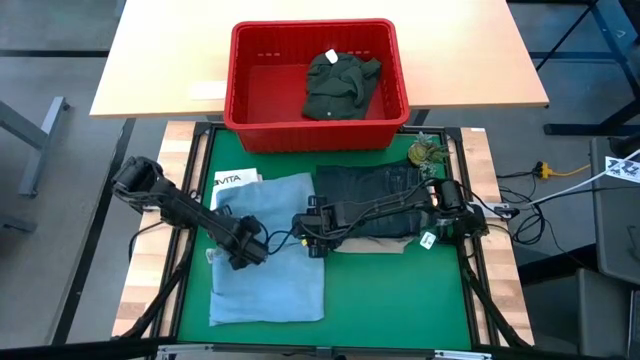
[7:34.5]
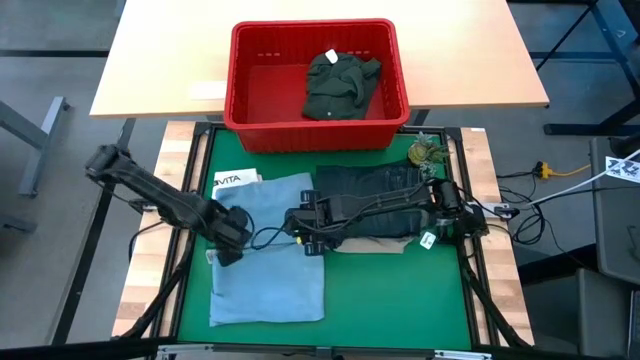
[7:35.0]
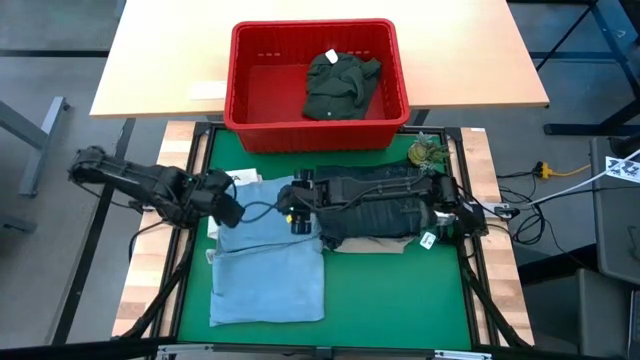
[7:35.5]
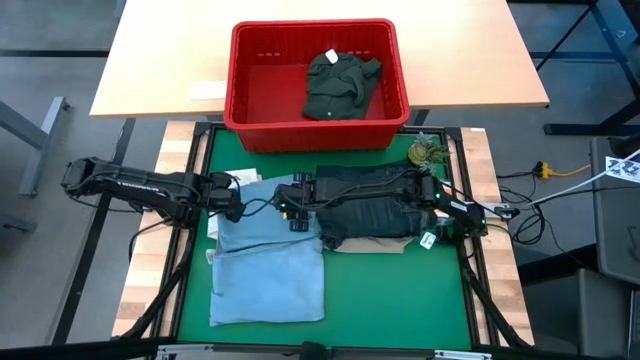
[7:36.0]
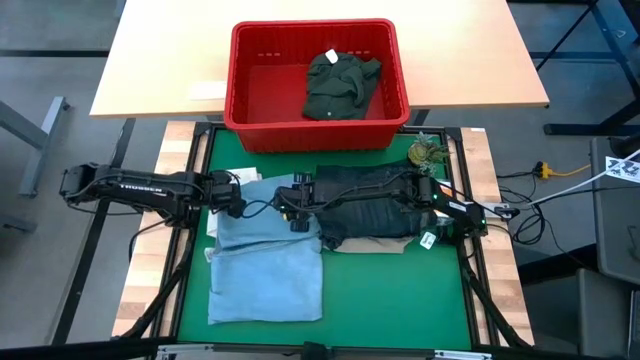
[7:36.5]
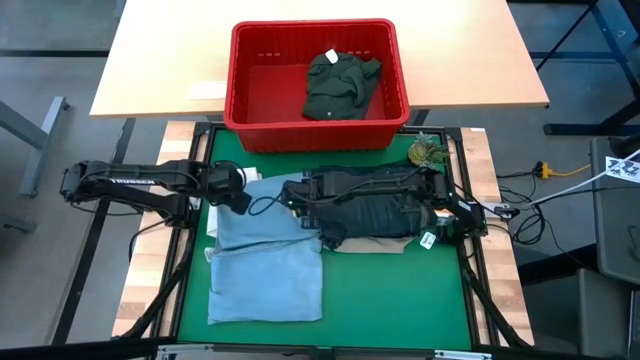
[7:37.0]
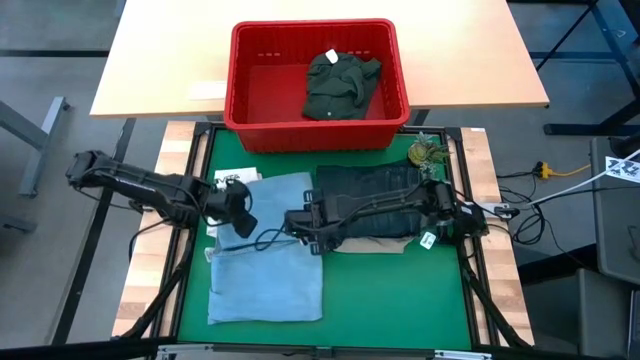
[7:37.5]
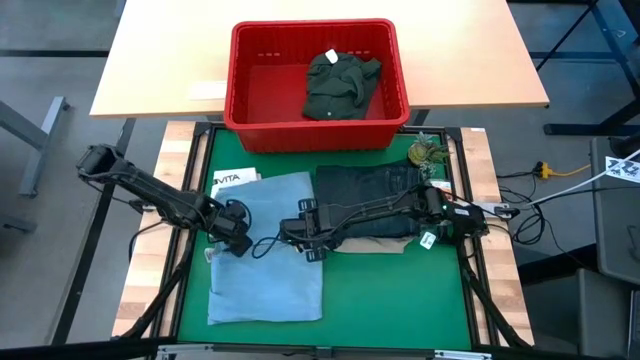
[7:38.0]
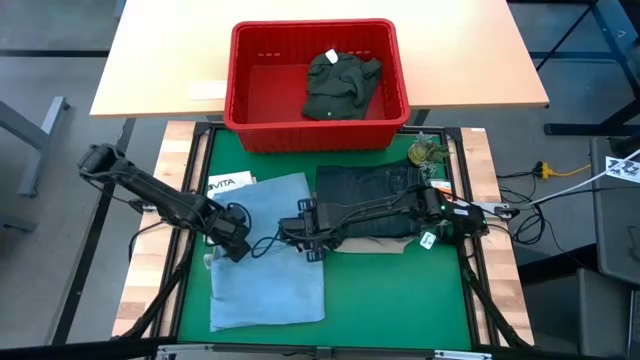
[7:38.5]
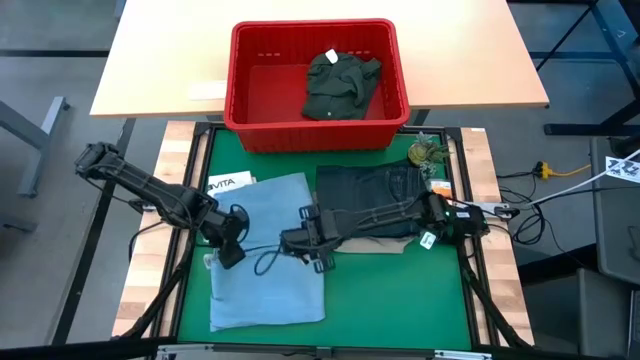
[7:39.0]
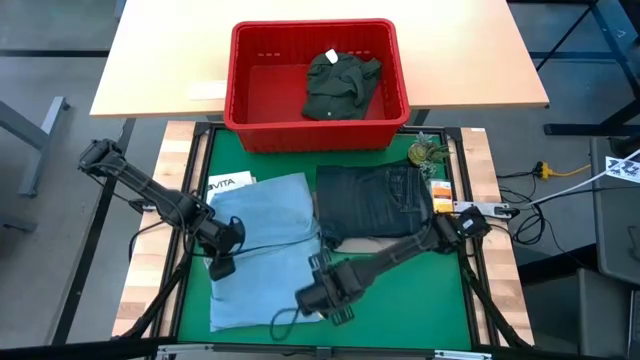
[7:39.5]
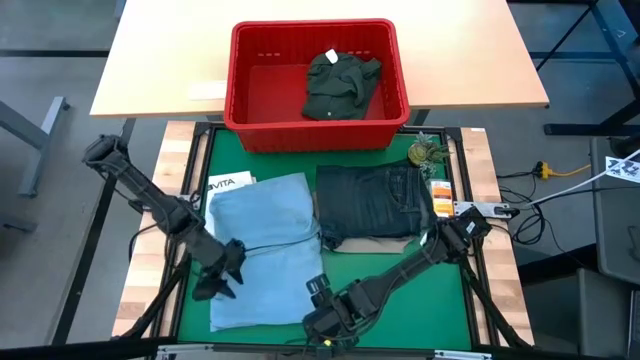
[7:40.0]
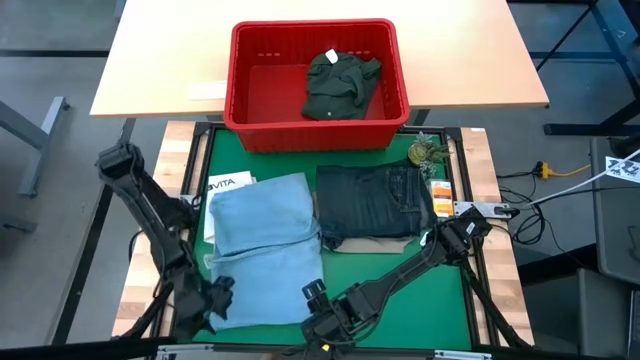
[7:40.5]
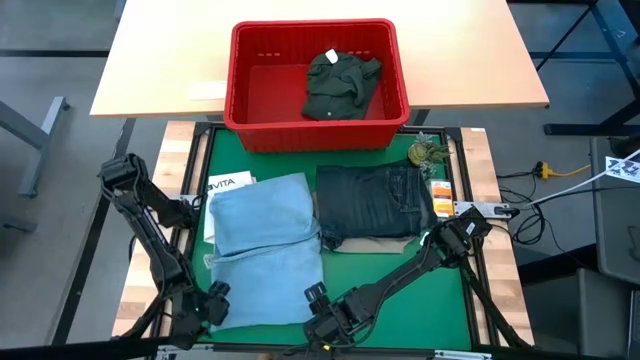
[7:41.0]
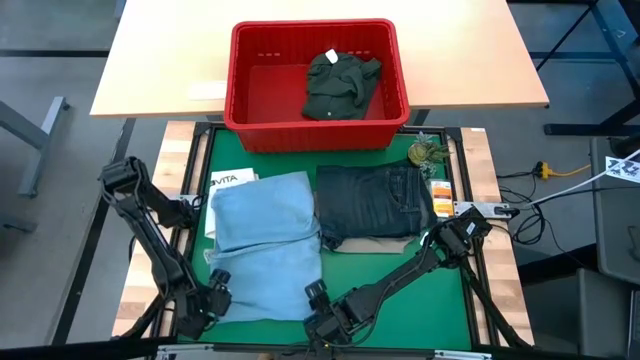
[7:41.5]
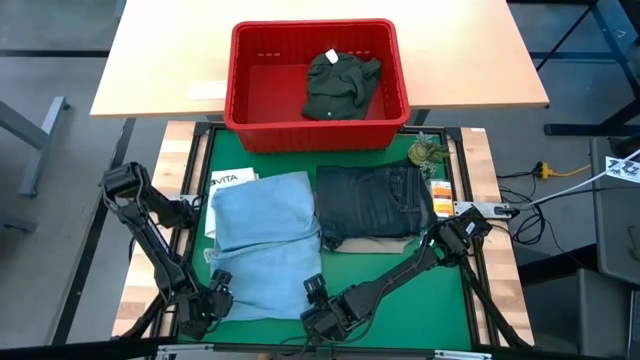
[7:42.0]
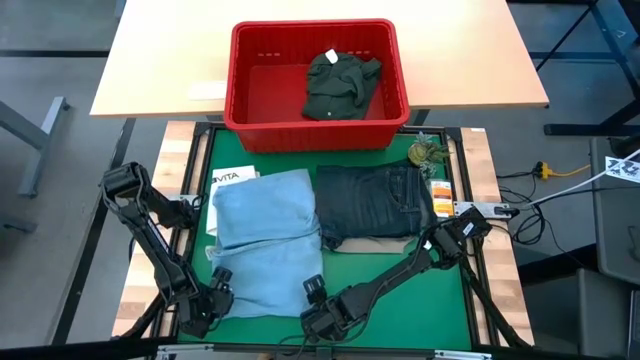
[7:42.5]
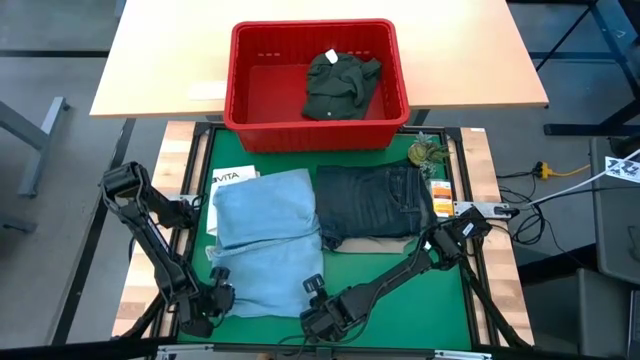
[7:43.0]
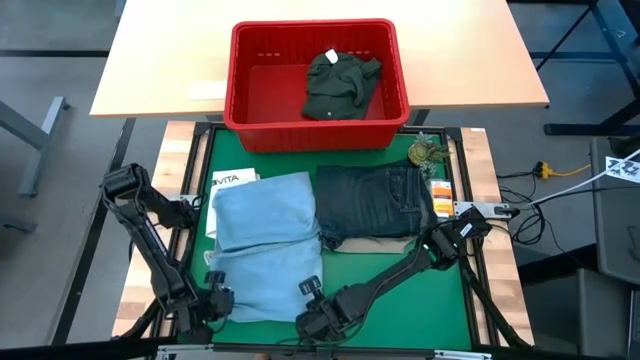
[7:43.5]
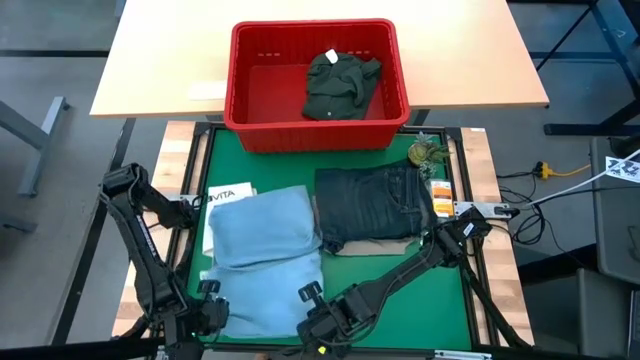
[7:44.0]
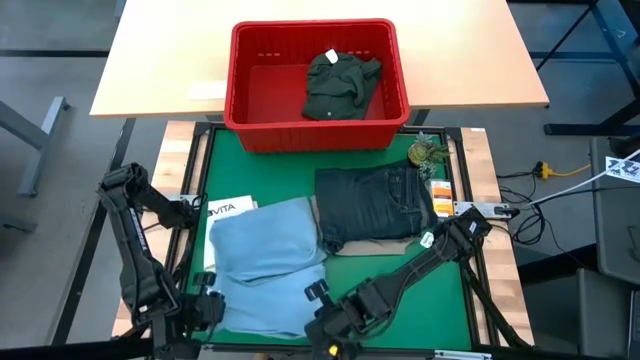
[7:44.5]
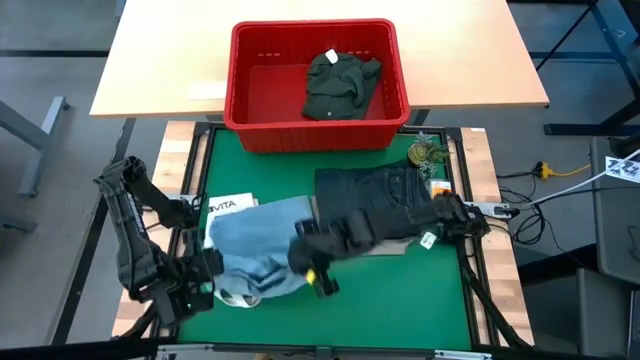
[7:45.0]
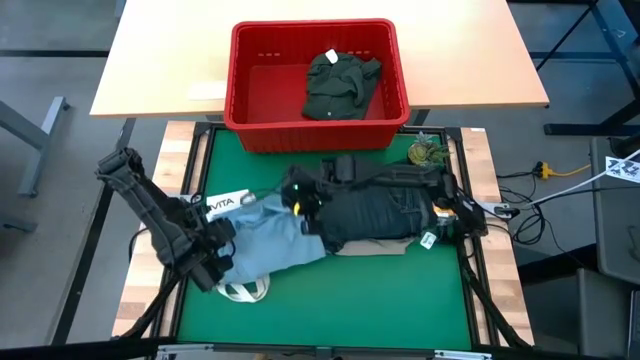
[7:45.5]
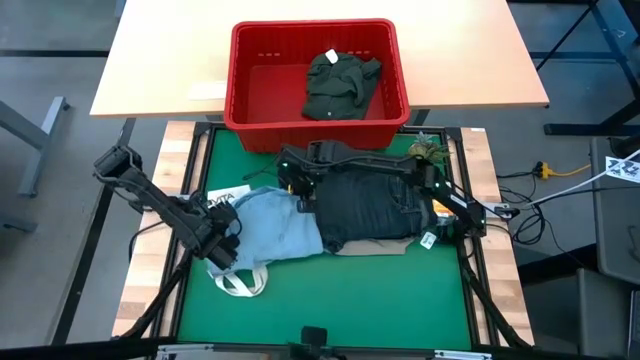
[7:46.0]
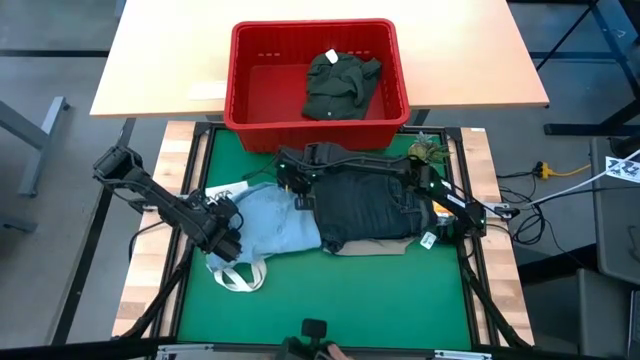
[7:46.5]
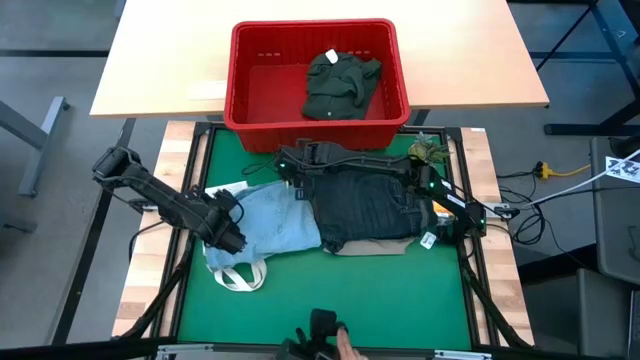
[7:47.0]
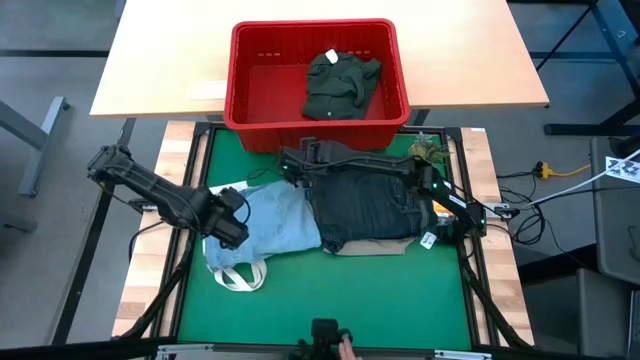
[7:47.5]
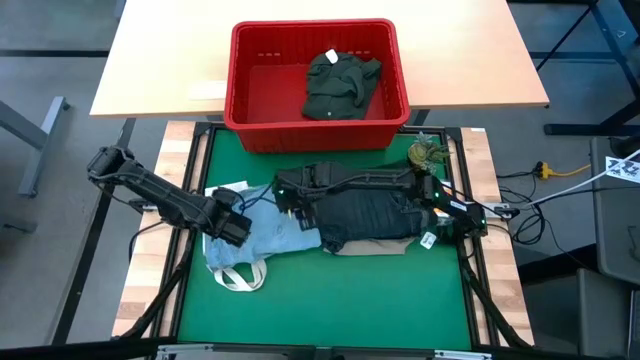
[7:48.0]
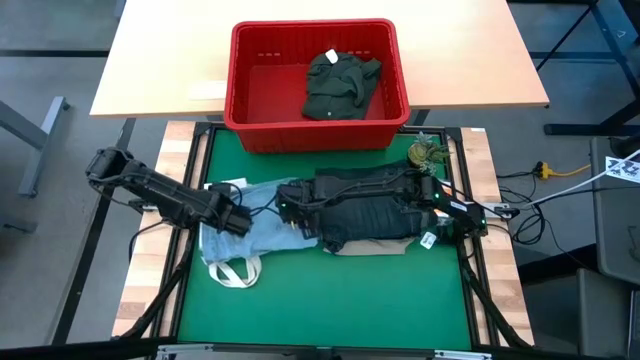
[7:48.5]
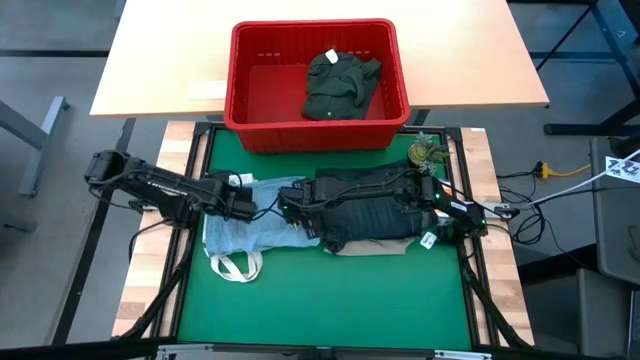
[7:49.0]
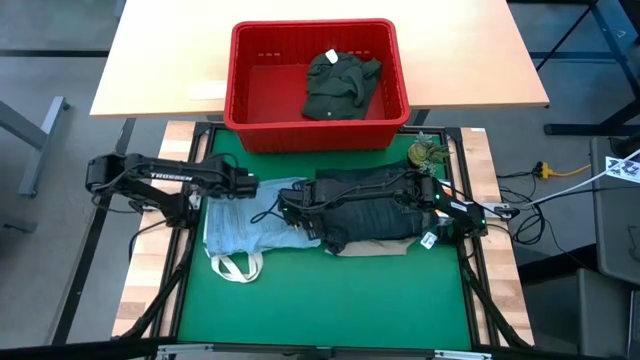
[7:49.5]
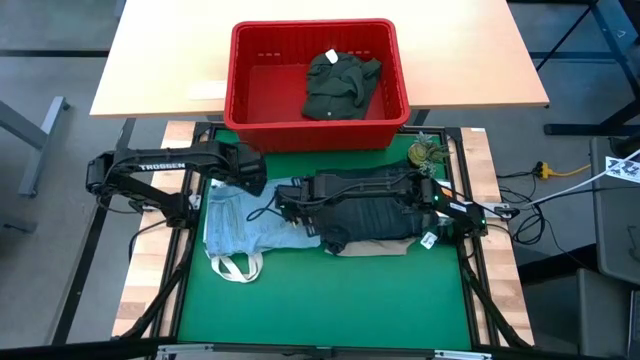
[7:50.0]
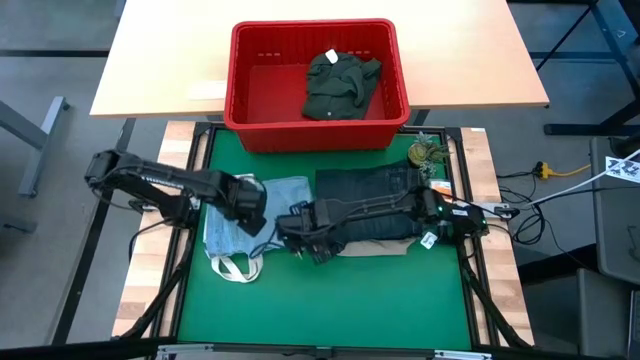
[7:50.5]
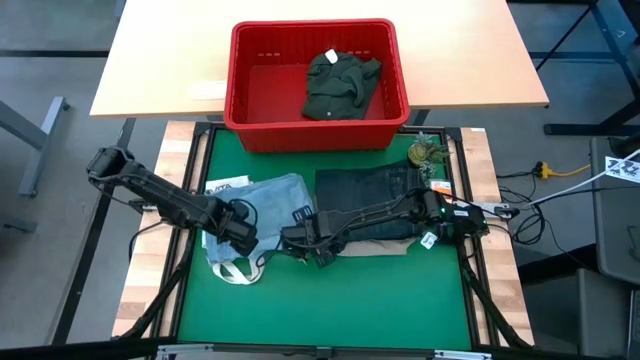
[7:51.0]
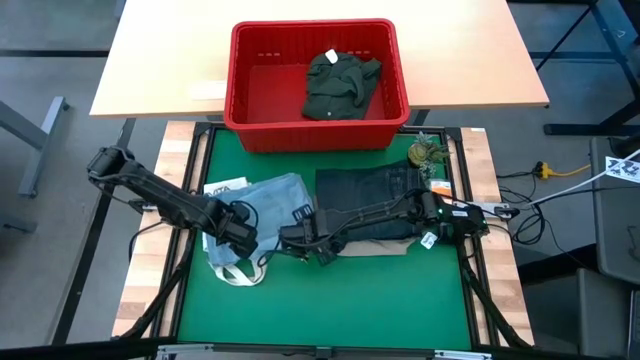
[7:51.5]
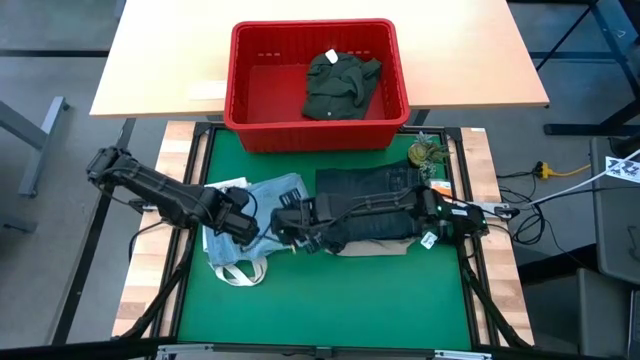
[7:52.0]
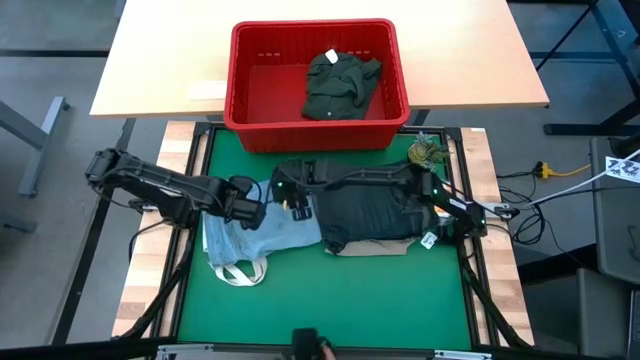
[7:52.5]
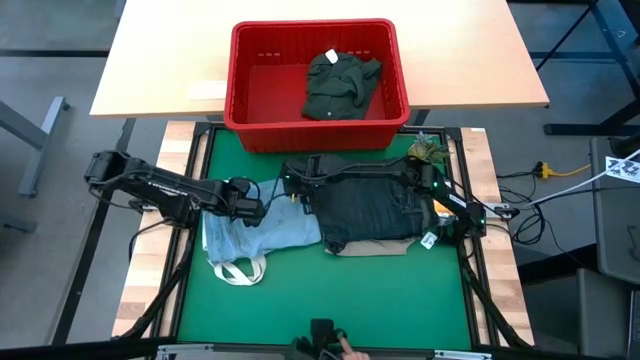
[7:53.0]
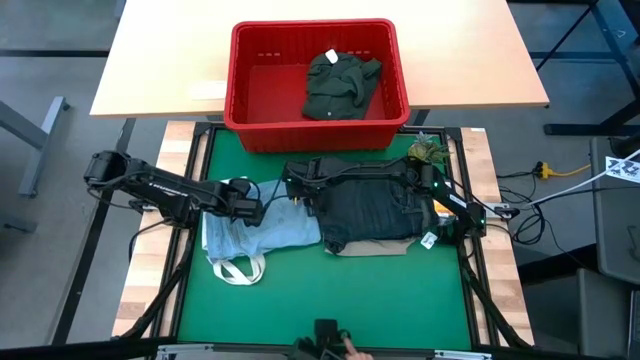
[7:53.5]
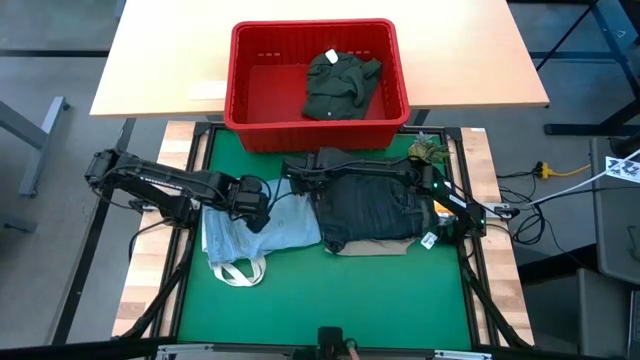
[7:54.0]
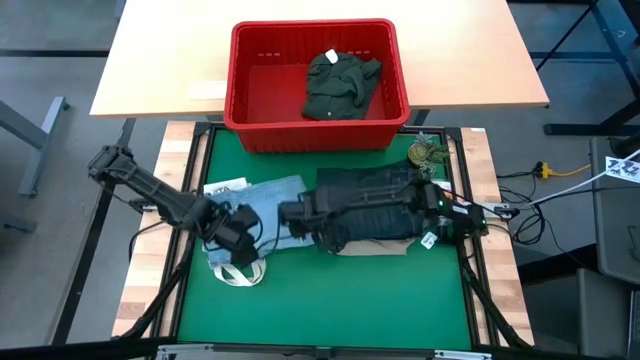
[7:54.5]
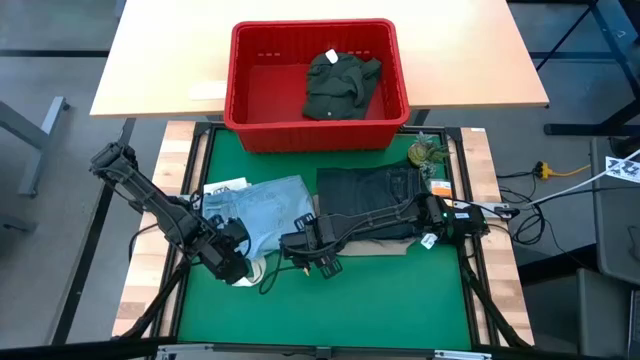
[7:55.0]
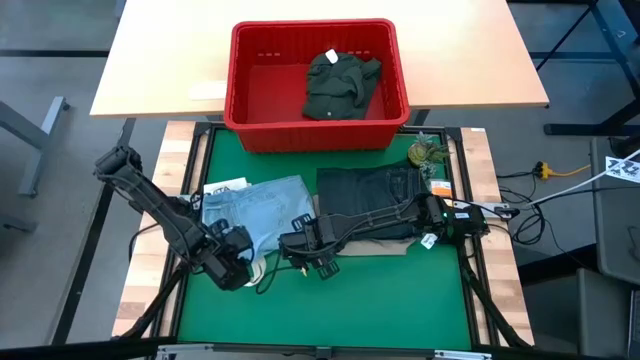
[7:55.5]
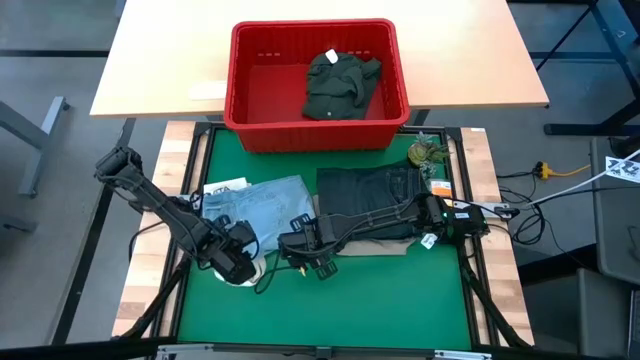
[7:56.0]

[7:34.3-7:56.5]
Task: Fold Laundry from Bin
Fold the light blue jeans
